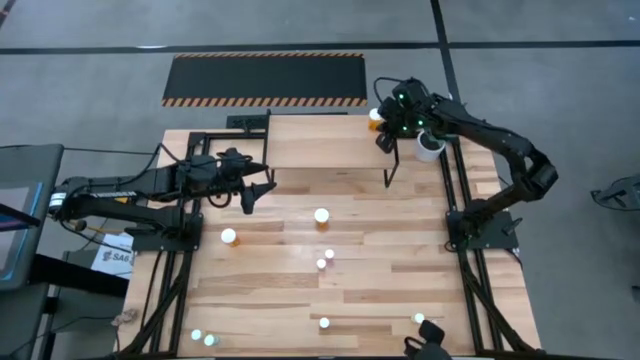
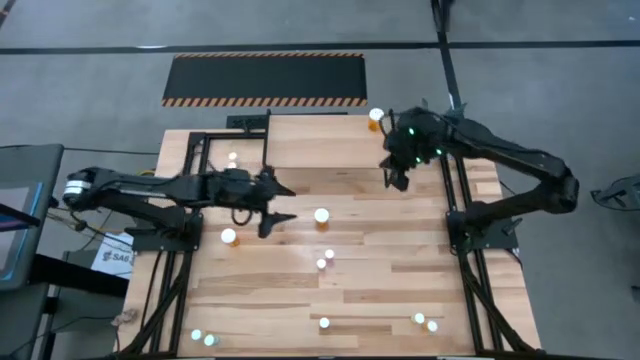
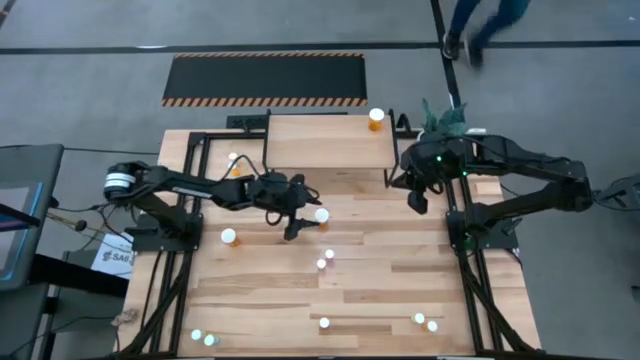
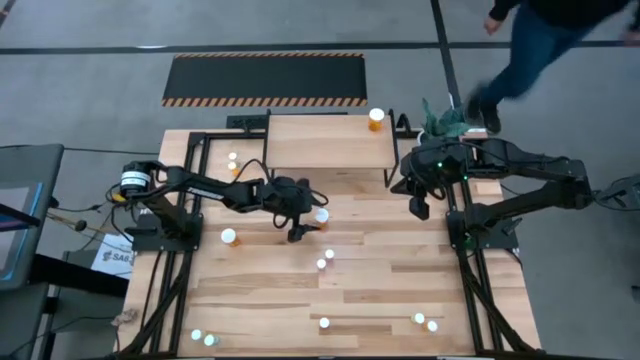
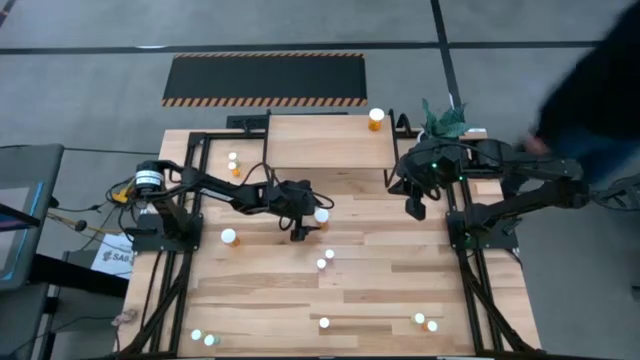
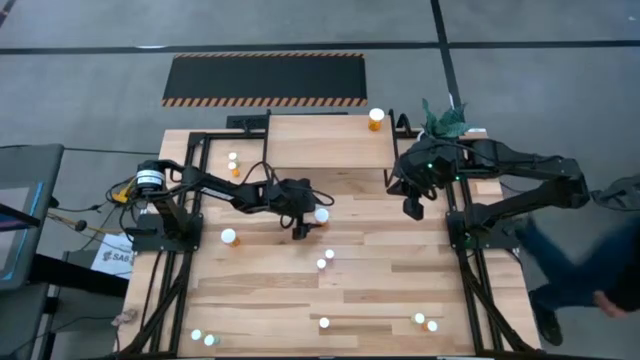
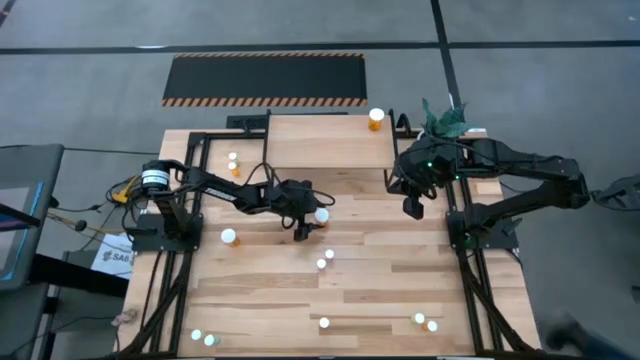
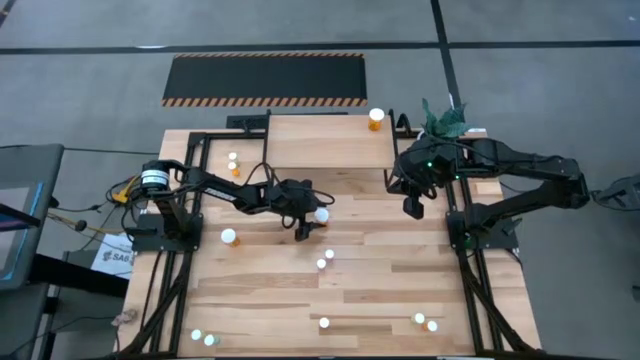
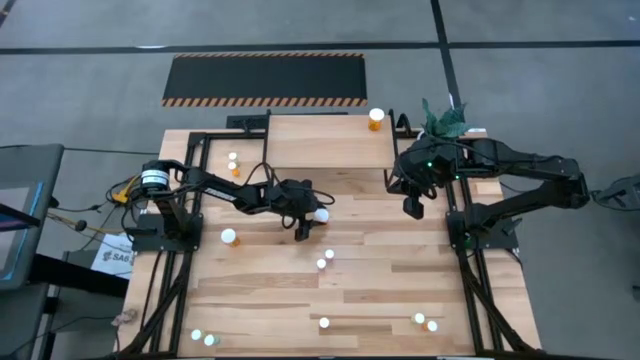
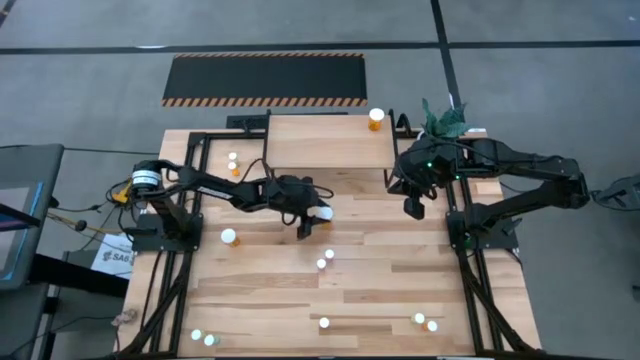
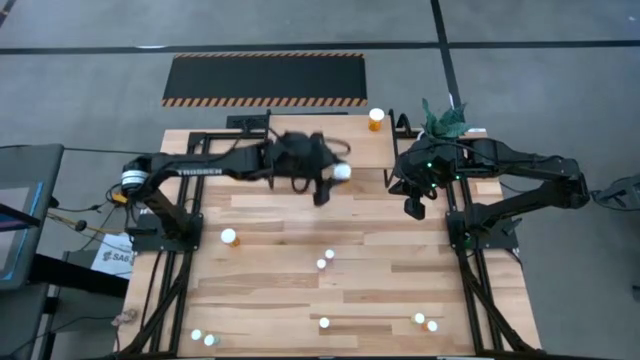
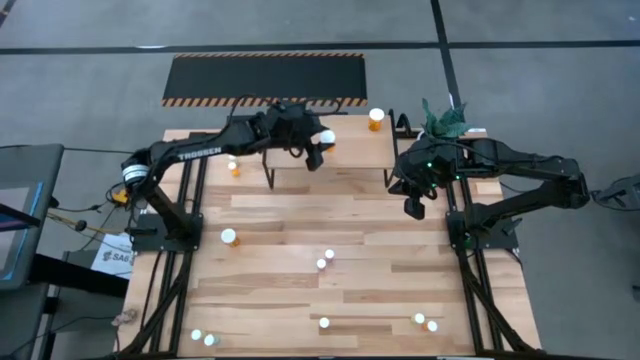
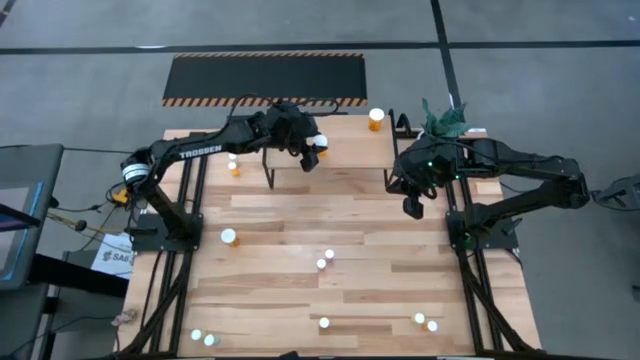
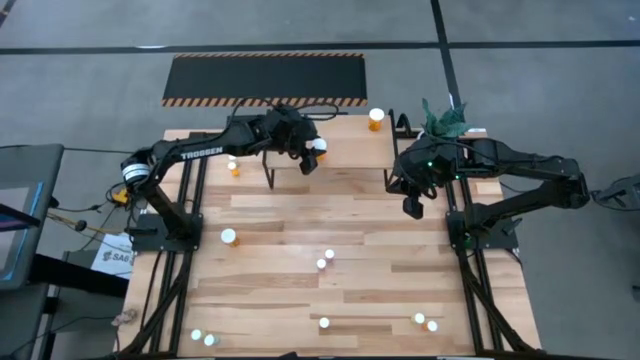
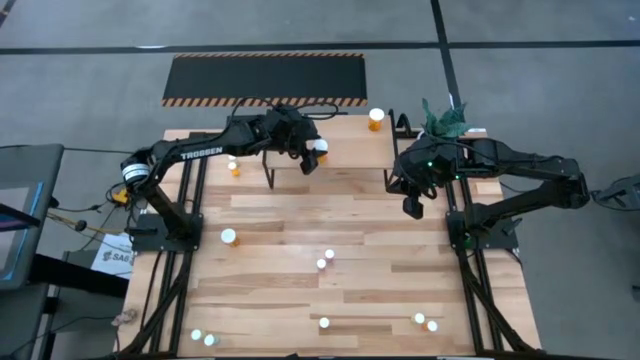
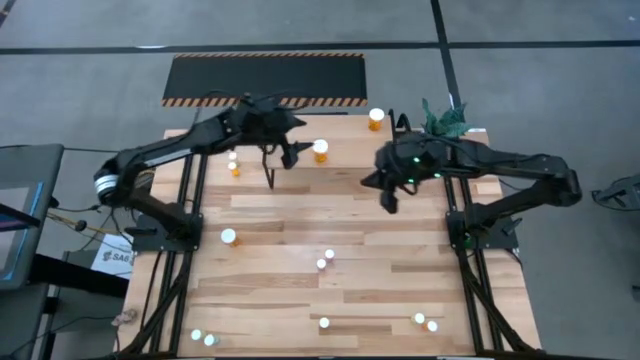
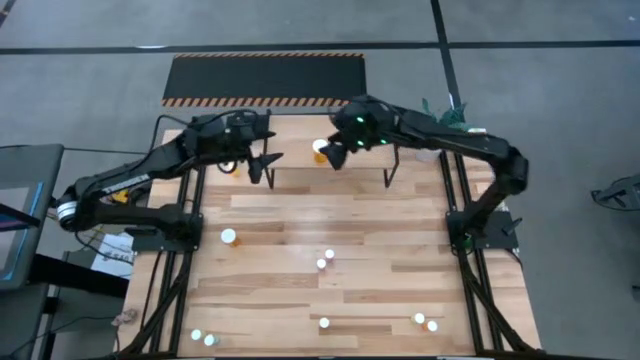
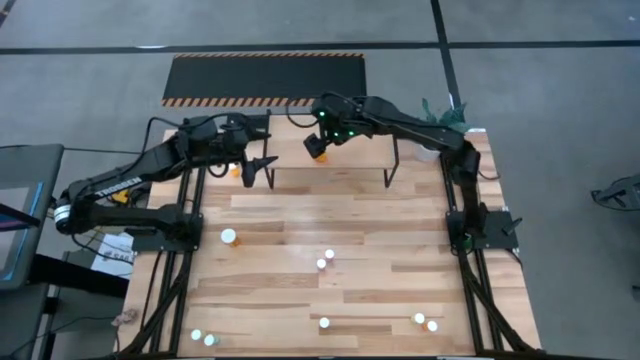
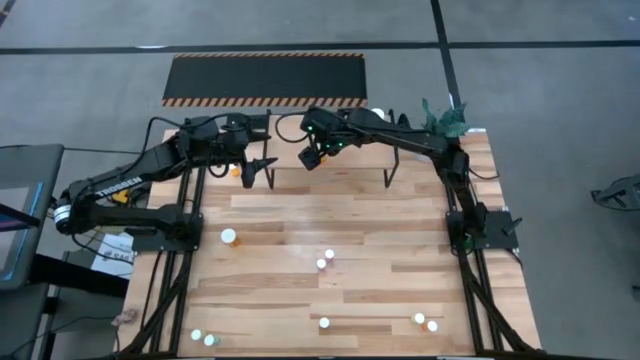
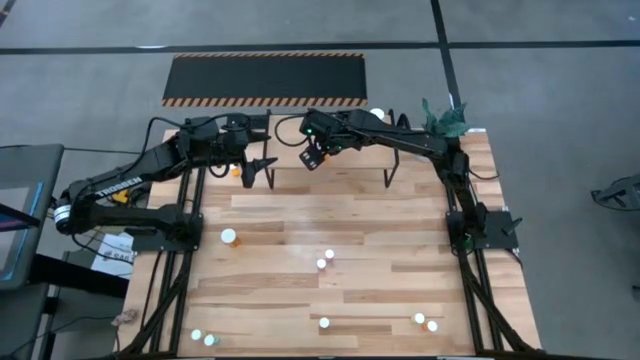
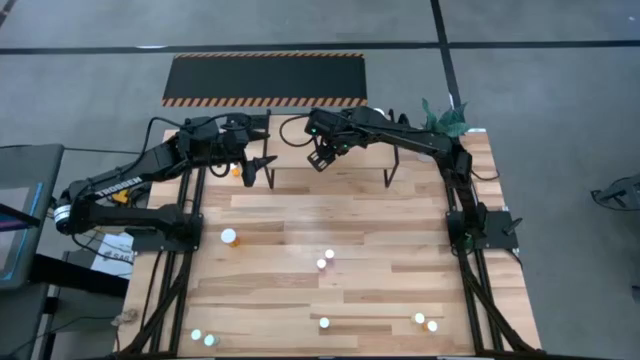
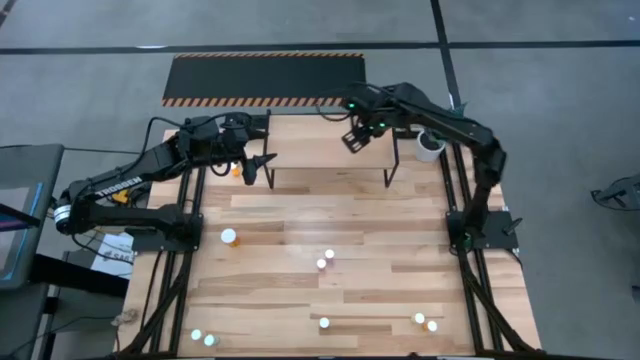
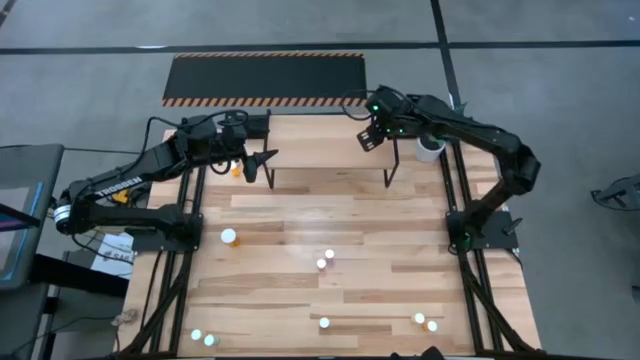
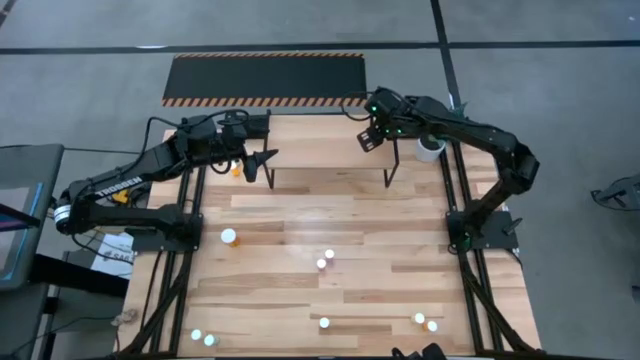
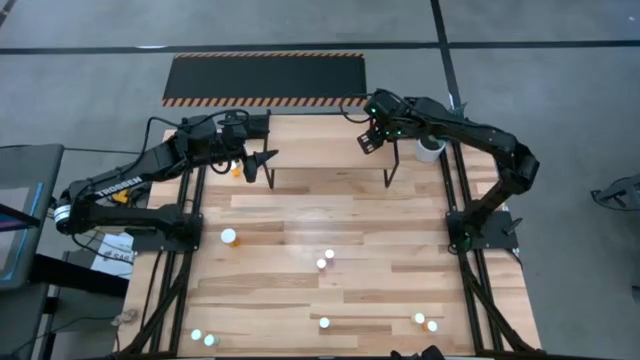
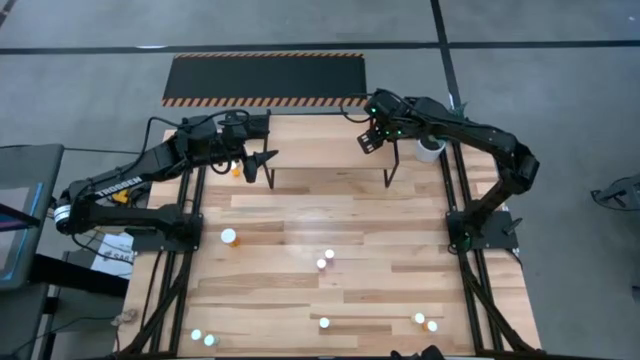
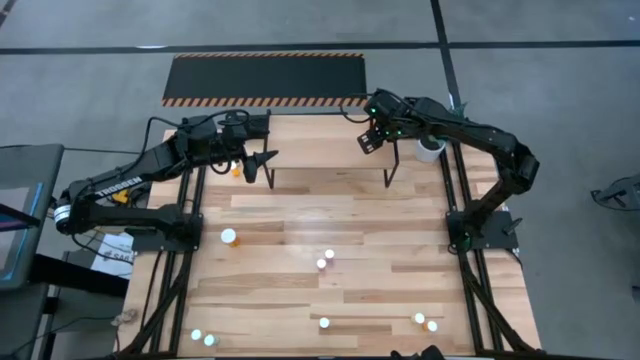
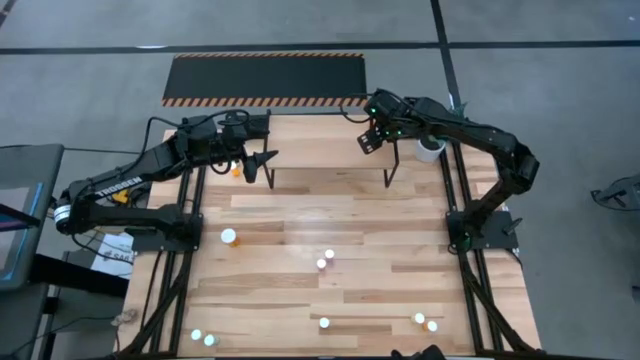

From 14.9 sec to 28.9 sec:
Task: Pick and place medicine bottles onto shelf by color
Put the middle orange pill bottle on the shelf aligned with the other large orange pill bottle

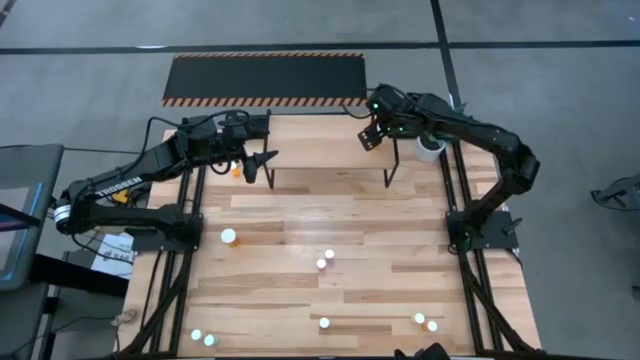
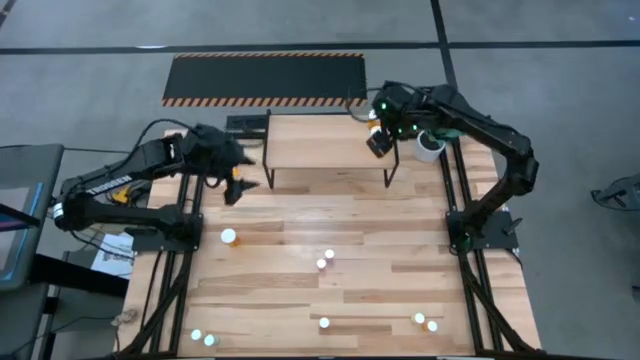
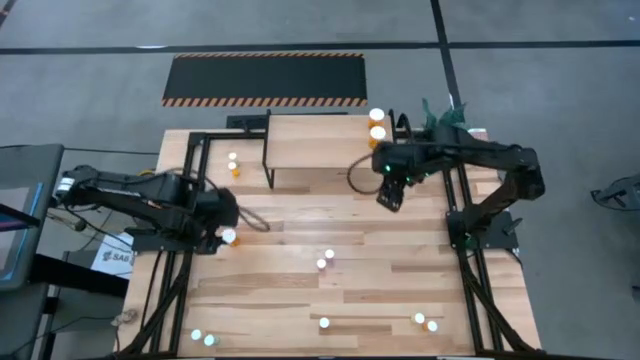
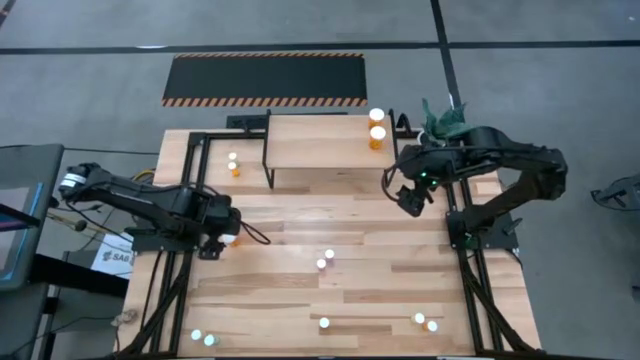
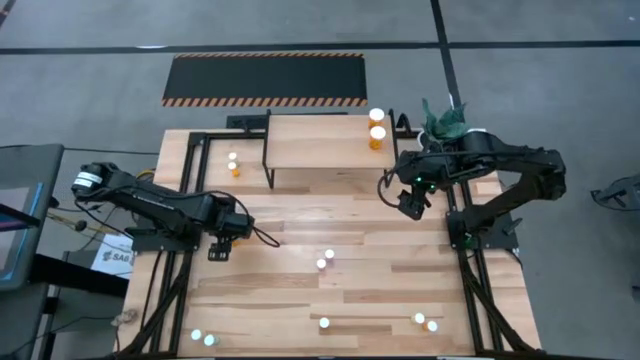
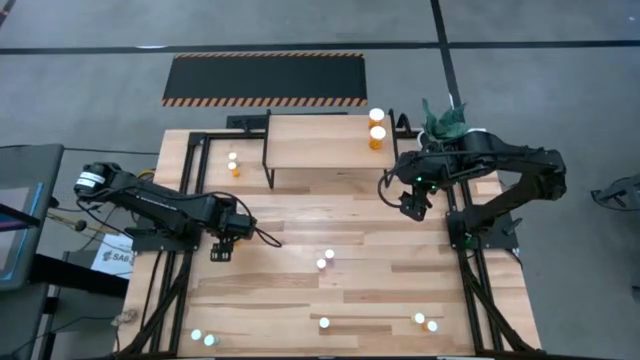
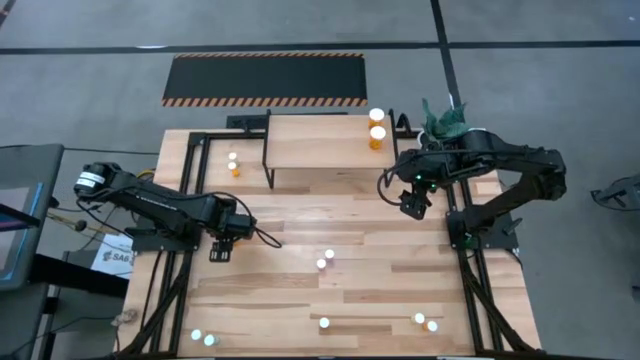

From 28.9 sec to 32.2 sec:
Put the large orange pill bottle on the shelf aligned with the other large orange pill bottles

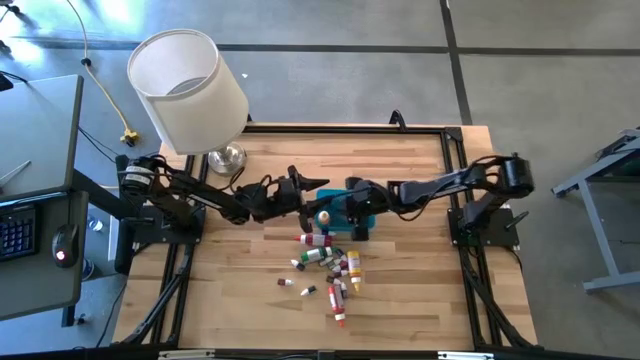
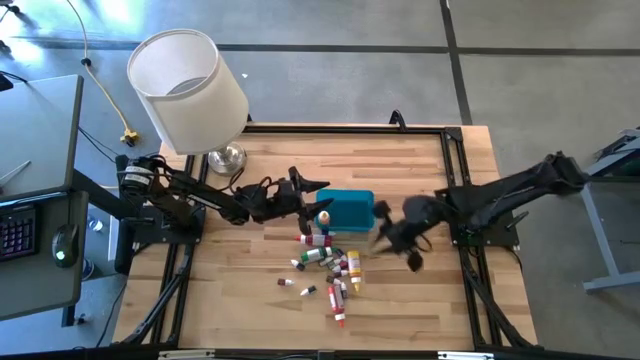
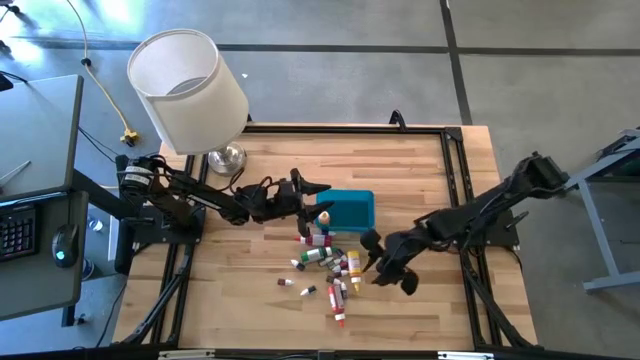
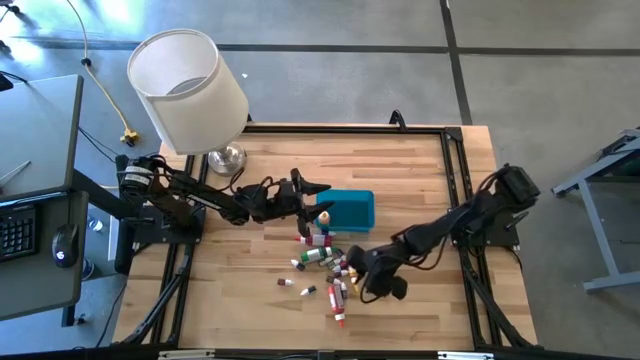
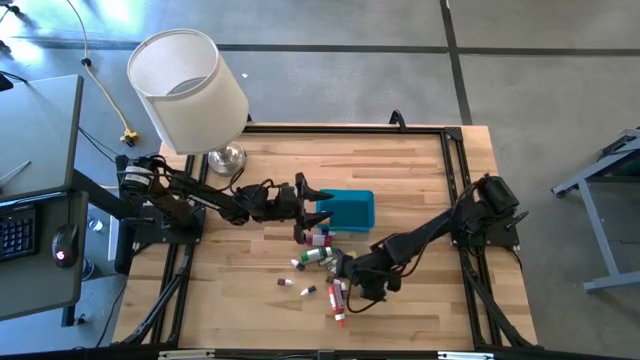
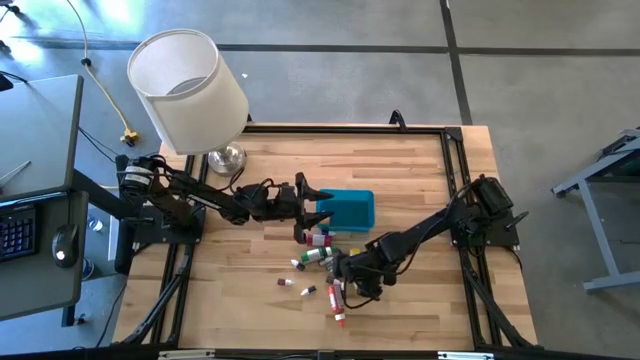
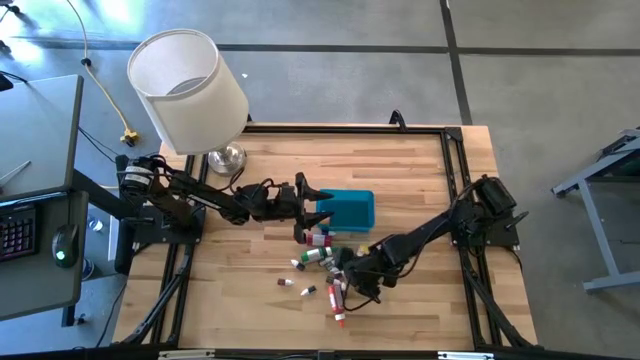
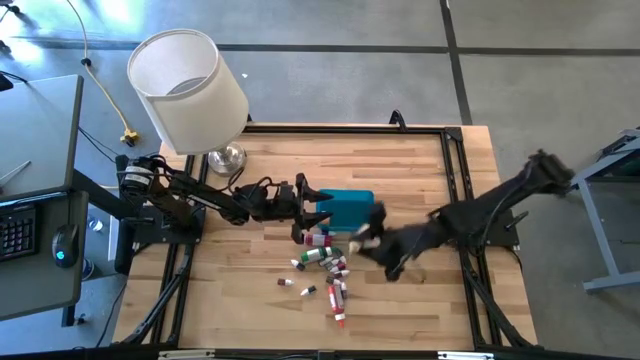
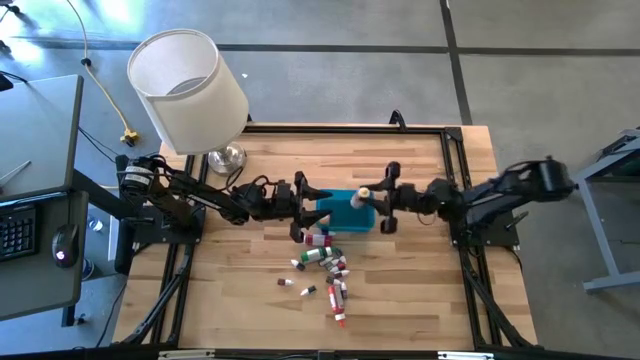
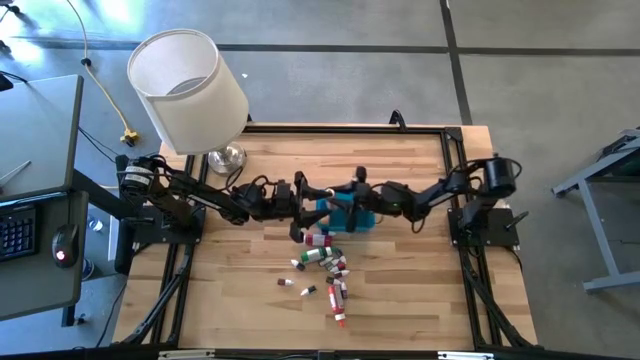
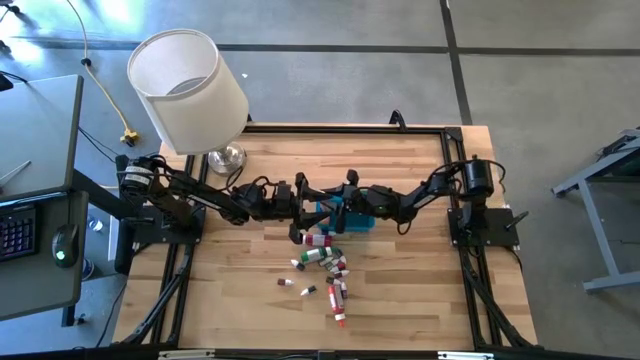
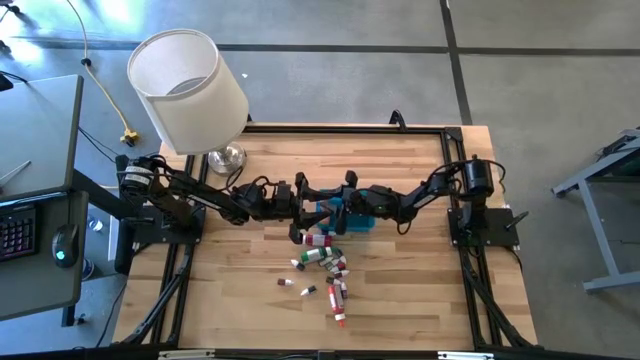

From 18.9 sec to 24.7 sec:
Task: Pick & Place food coloring
Put the large yellow food coloring bottle into the bin
